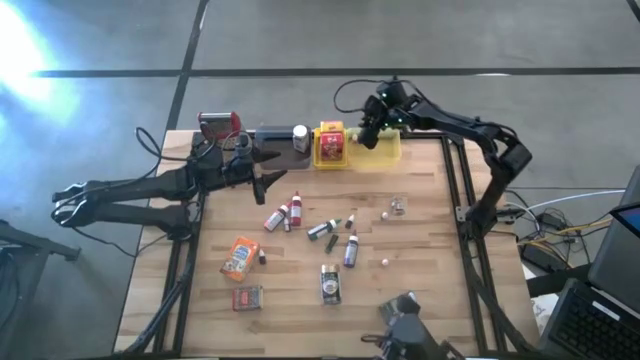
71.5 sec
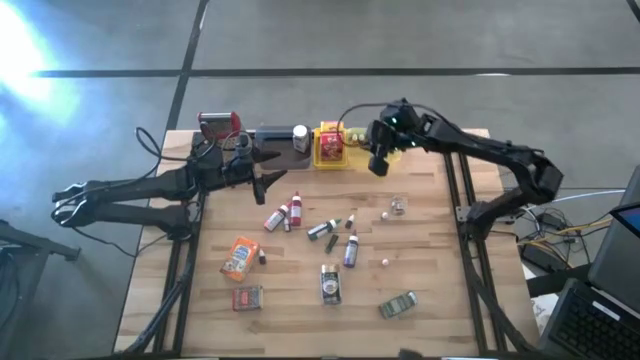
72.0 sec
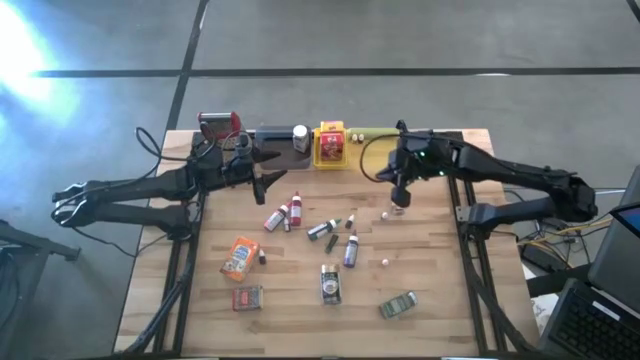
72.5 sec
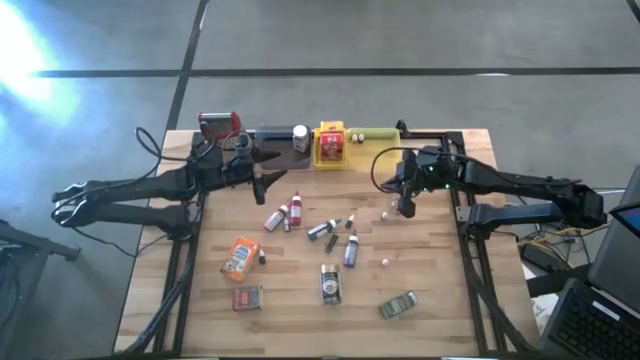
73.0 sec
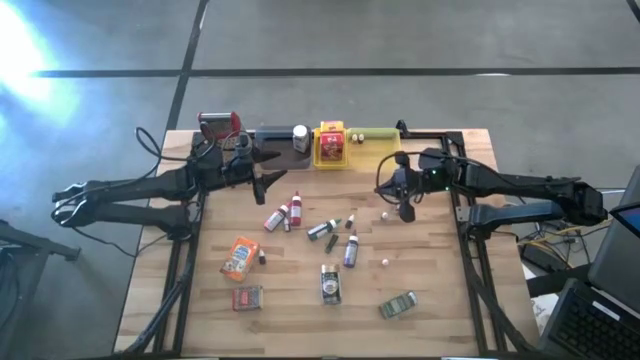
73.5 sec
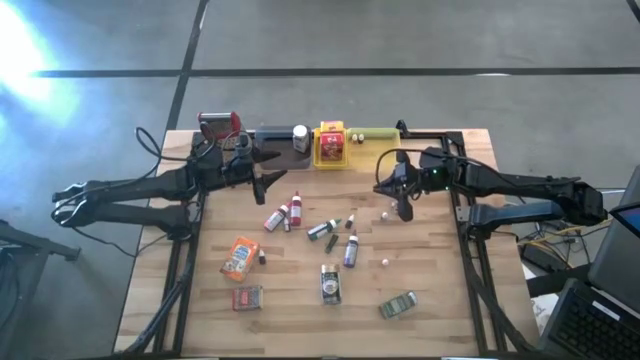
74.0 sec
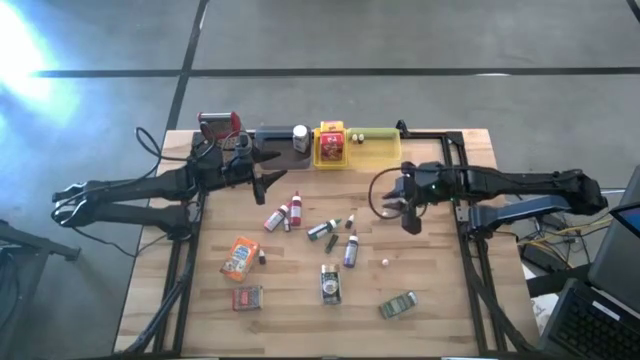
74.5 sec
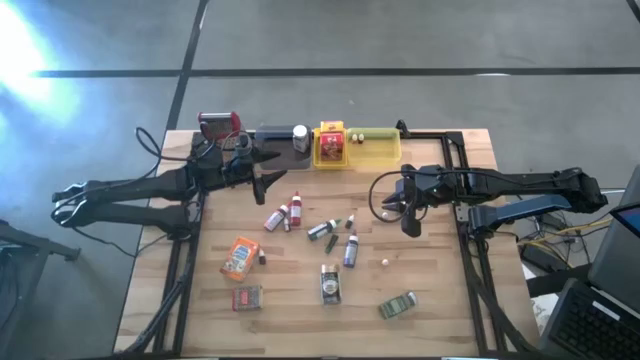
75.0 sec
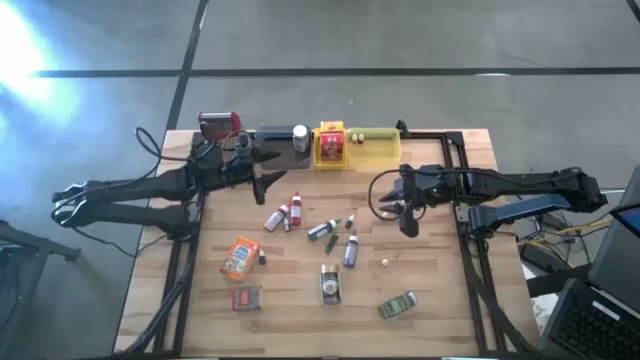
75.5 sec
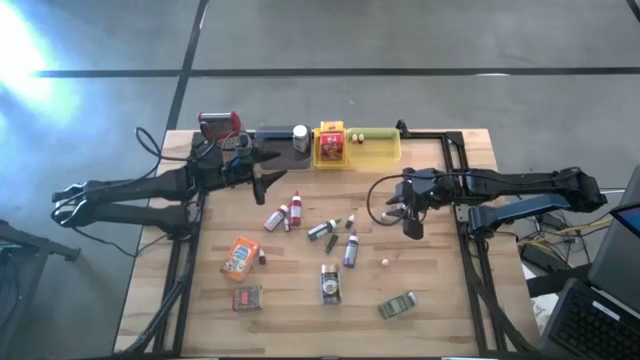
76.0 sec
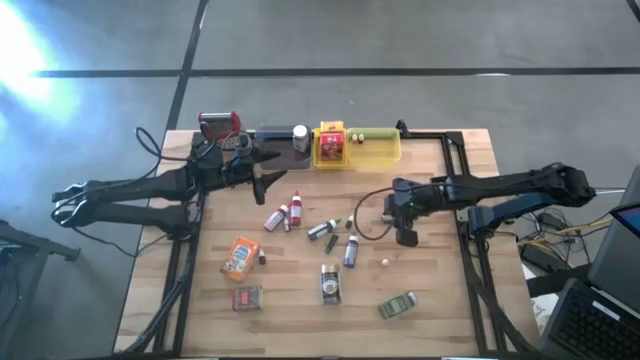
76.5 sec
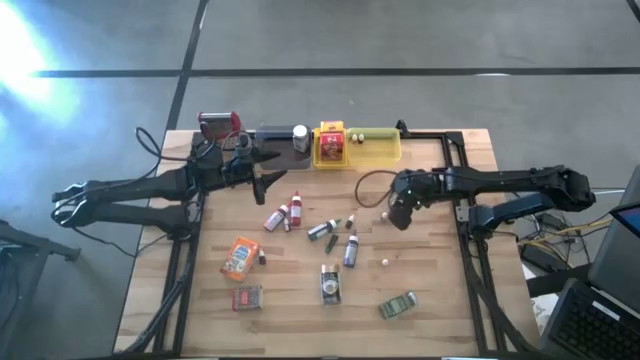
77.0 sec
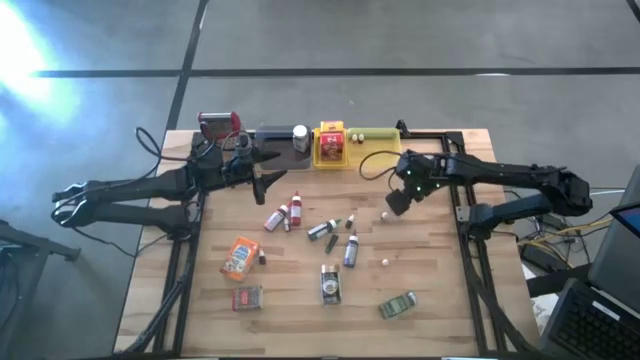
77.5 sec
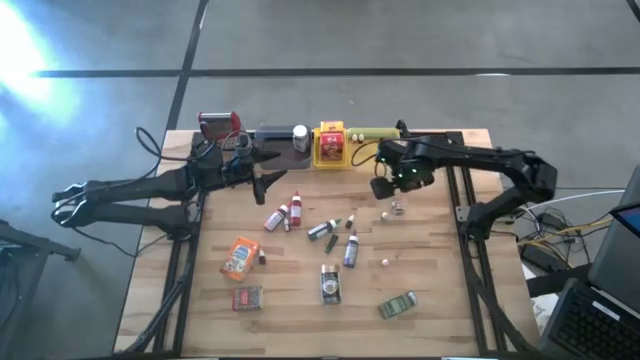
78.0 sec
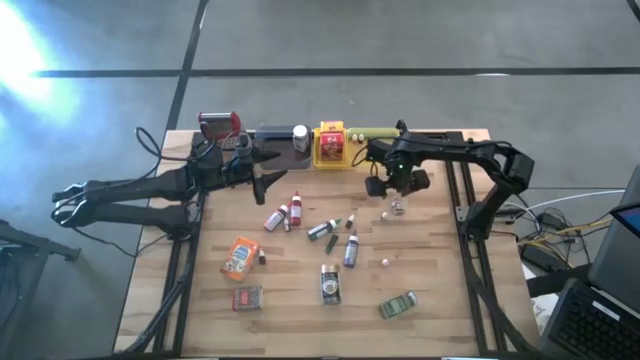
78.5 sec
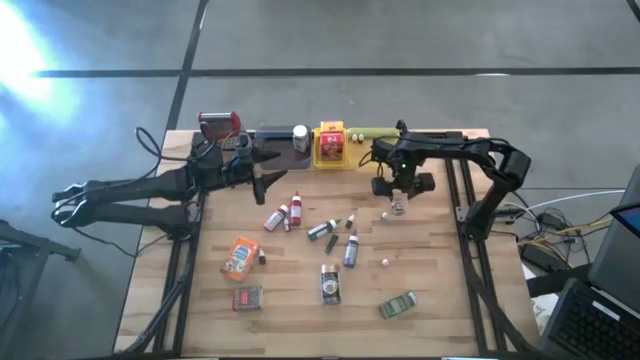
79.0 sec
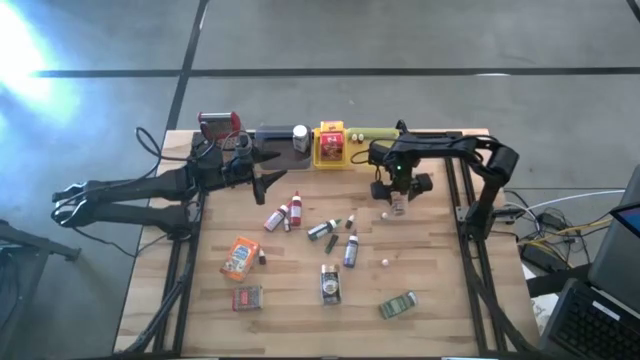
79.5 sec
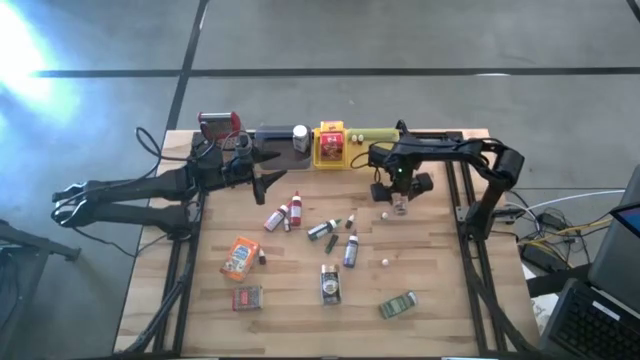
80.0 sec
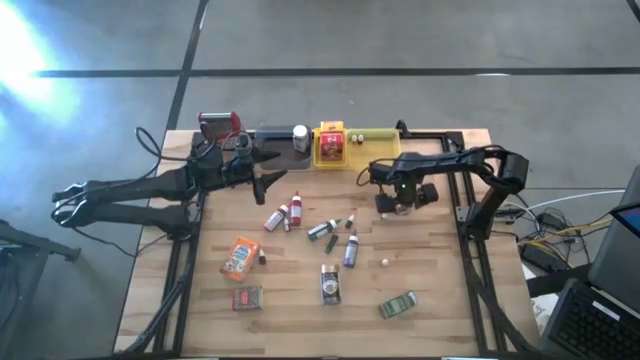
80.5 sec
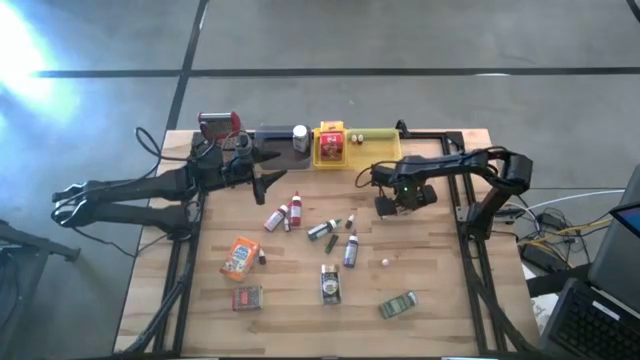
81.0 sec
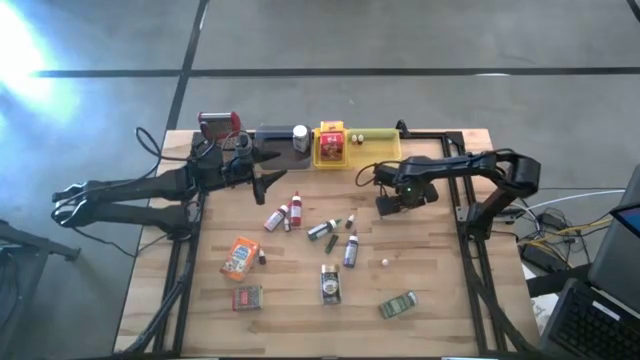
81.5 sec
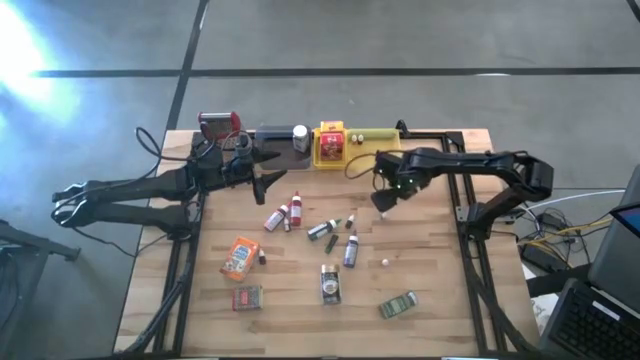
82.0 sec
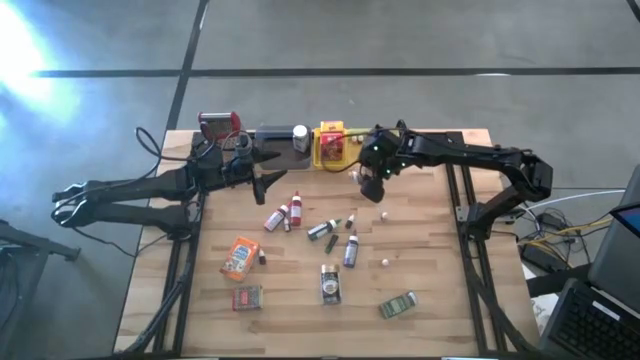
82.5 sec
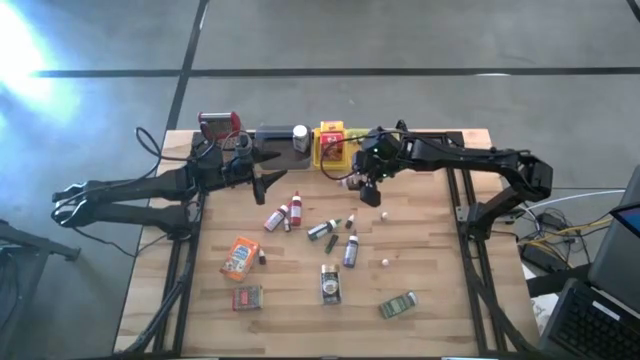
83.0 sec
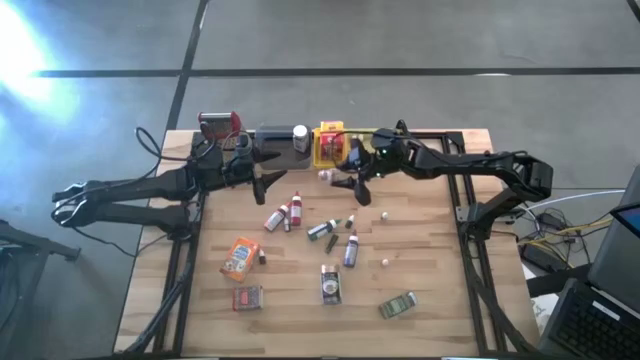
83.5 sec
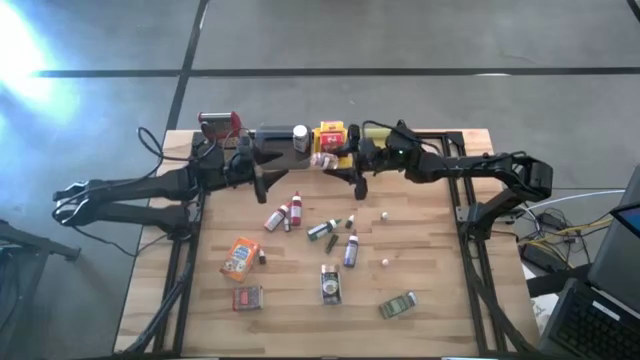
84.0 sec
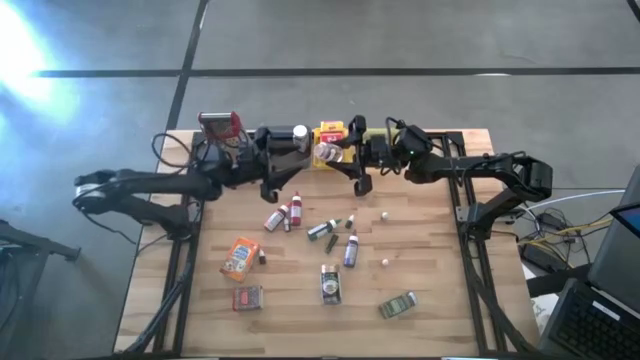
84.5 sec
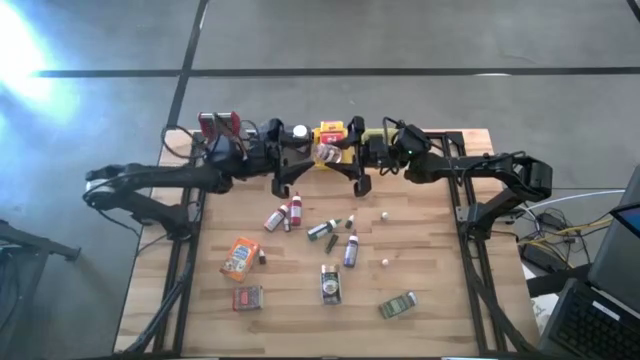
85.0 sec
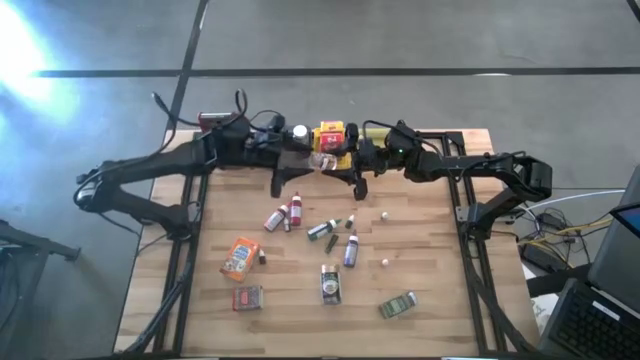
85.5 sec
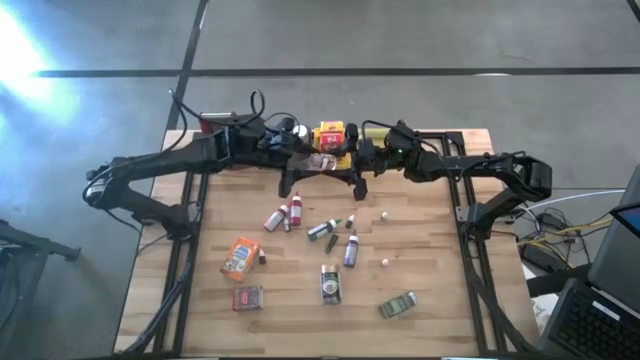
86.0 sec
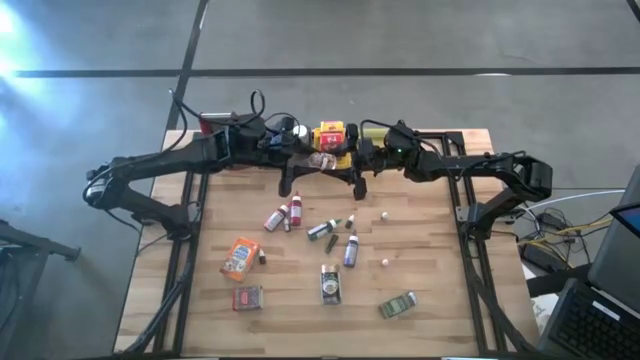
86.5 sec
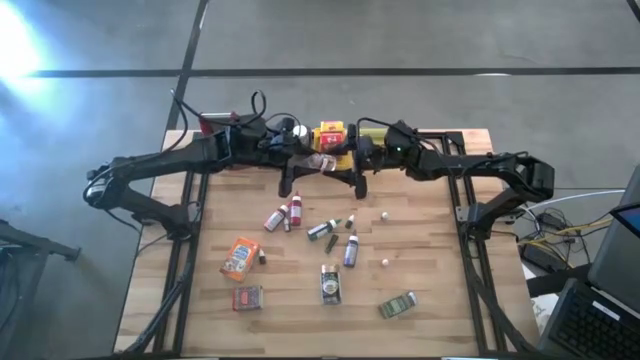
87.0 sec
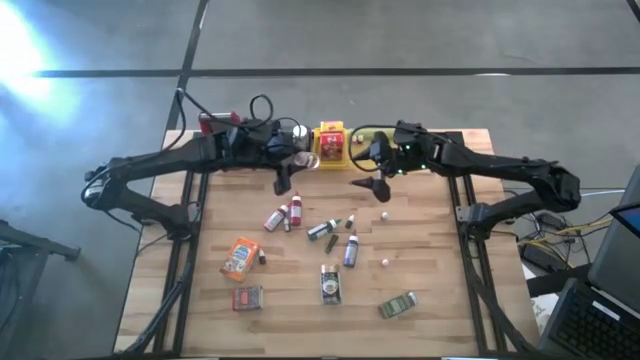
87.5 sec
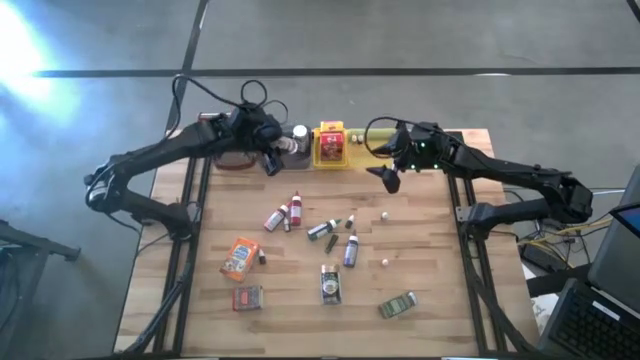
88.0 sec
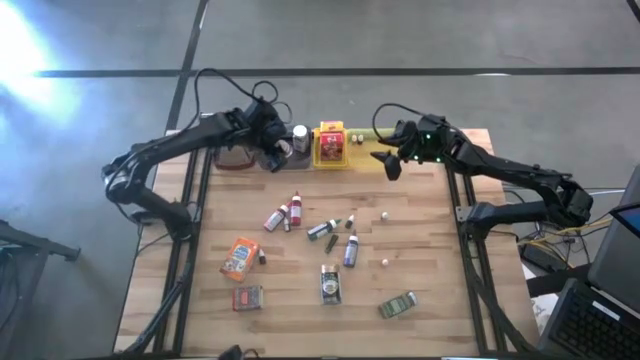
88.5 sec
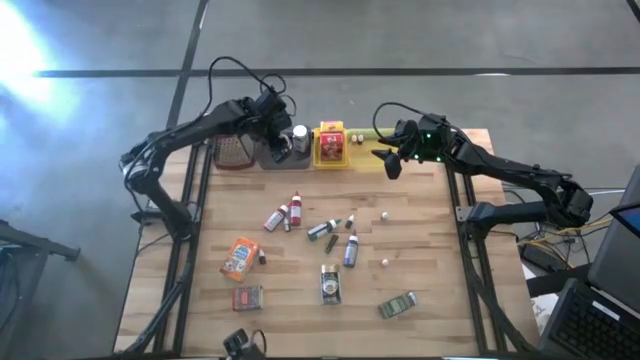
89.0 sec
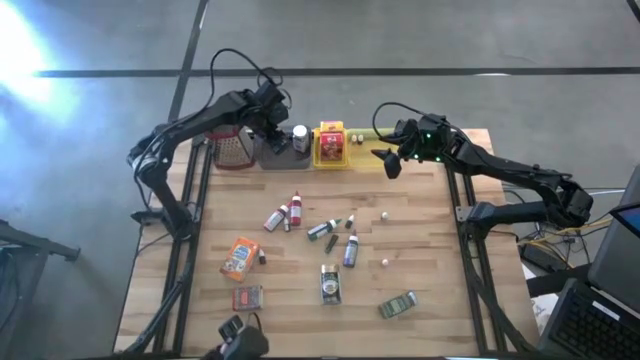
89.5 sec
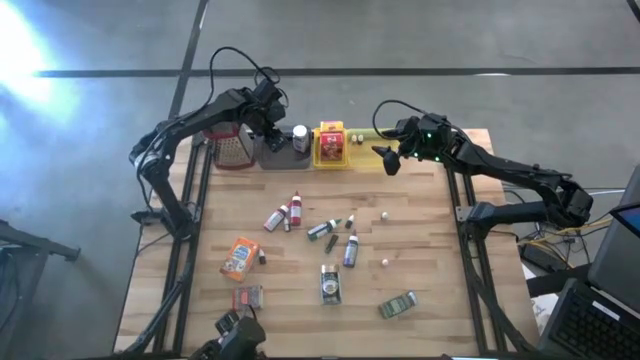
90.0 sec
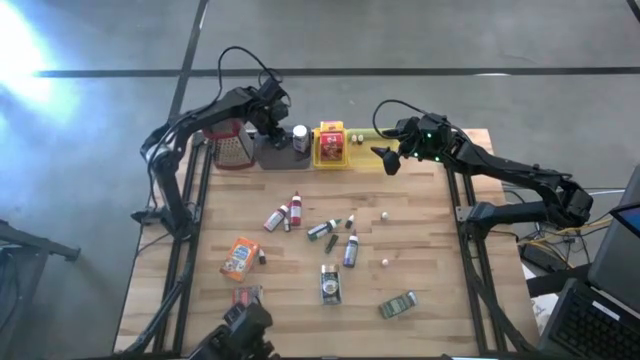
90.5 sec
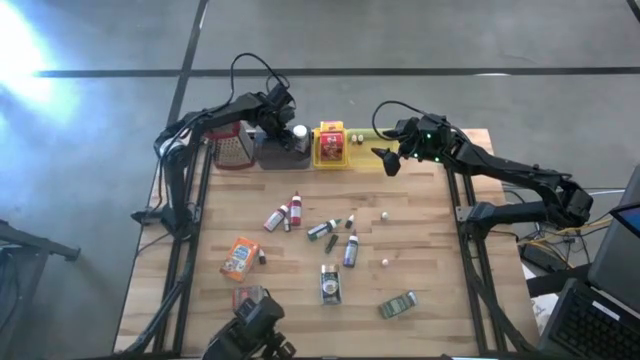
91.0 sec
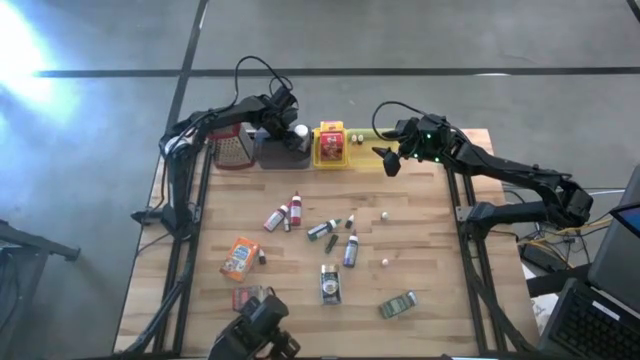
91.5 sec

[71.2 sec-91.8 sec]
Task: Pick & Place Kitchen Items
Put the brown seasoning bottle into the black bin
